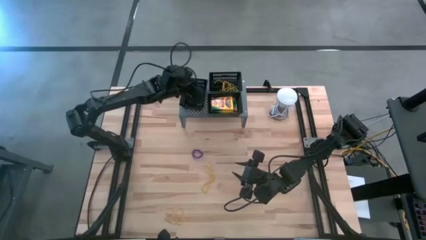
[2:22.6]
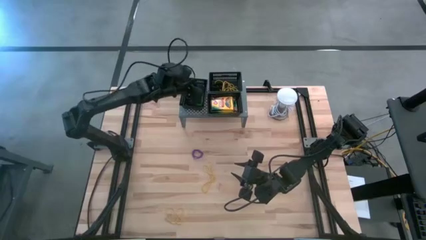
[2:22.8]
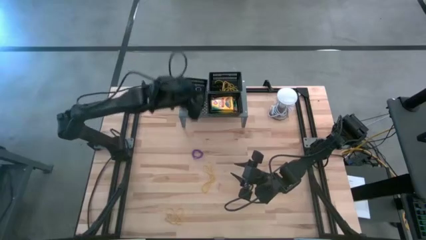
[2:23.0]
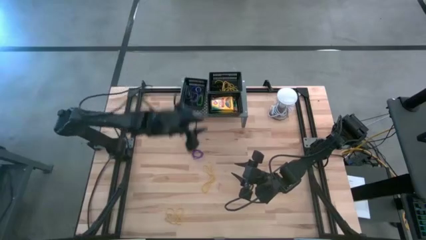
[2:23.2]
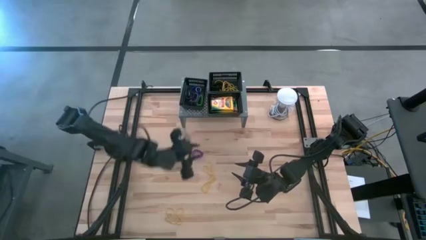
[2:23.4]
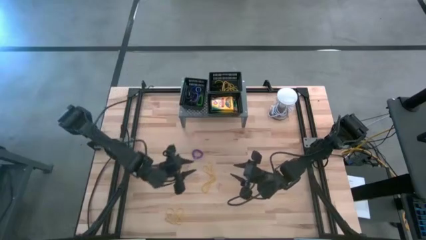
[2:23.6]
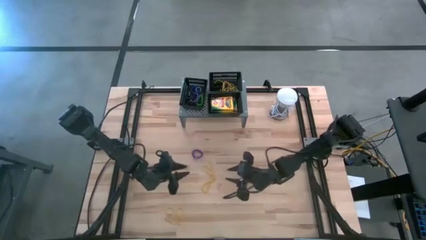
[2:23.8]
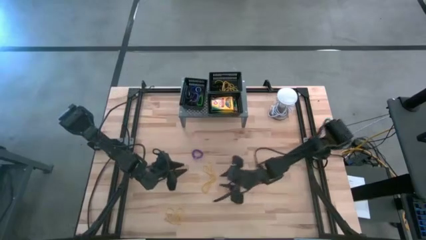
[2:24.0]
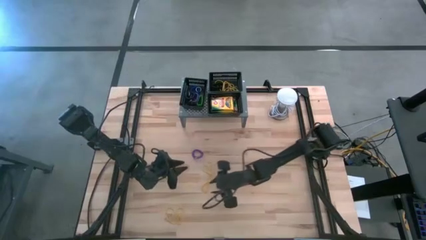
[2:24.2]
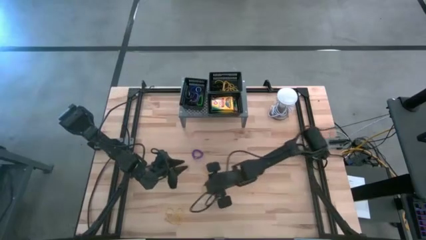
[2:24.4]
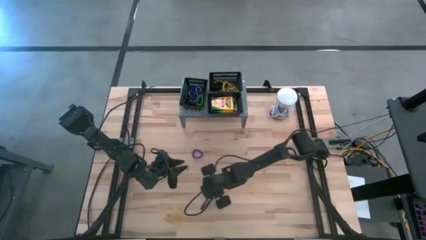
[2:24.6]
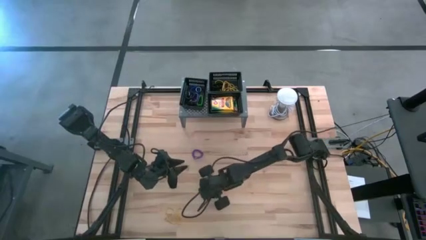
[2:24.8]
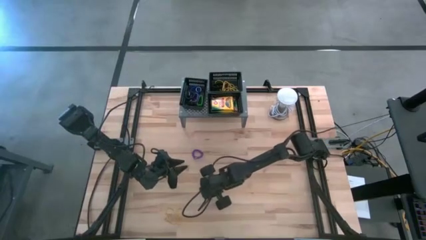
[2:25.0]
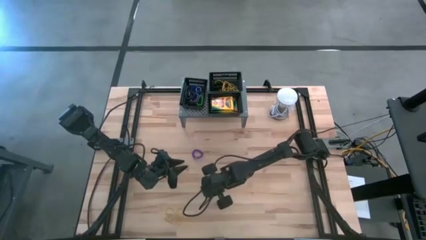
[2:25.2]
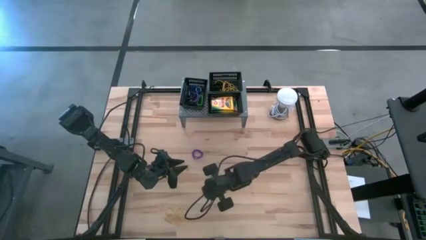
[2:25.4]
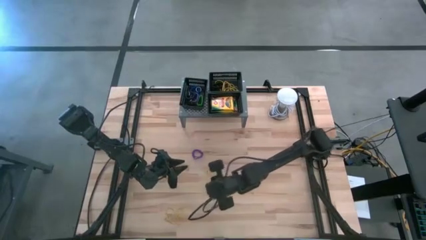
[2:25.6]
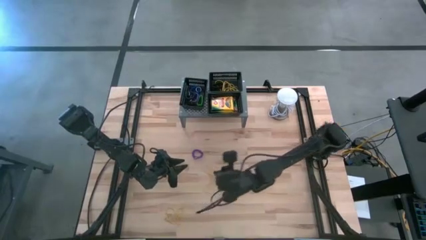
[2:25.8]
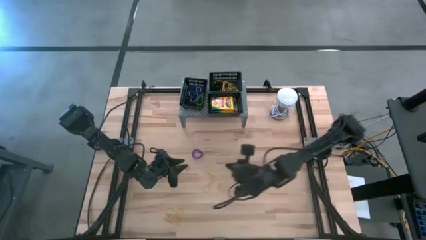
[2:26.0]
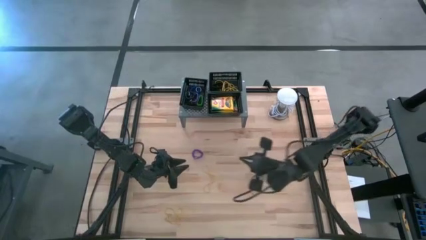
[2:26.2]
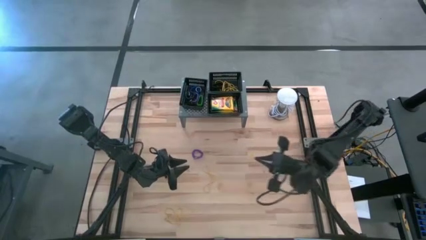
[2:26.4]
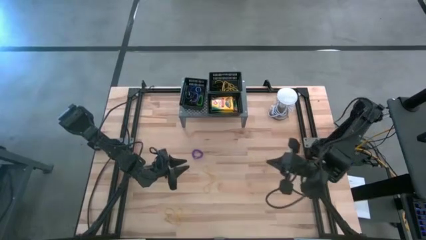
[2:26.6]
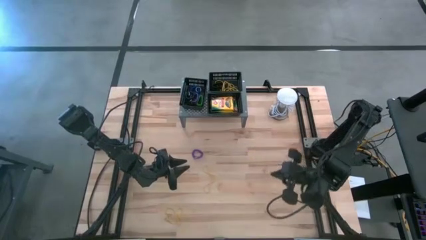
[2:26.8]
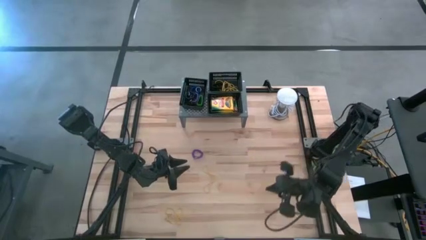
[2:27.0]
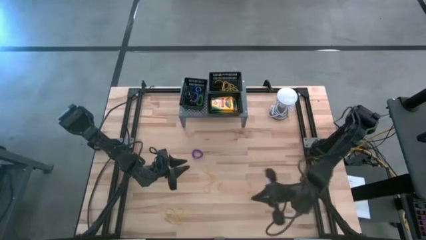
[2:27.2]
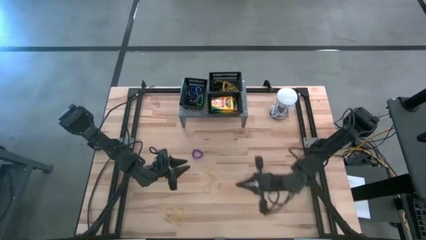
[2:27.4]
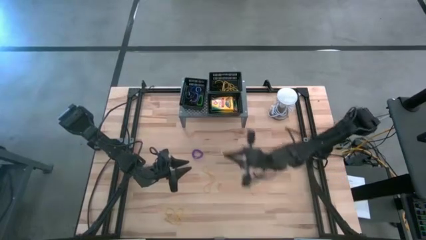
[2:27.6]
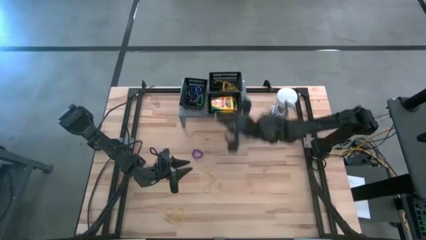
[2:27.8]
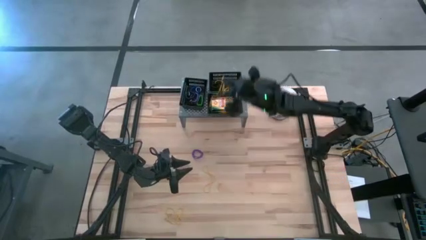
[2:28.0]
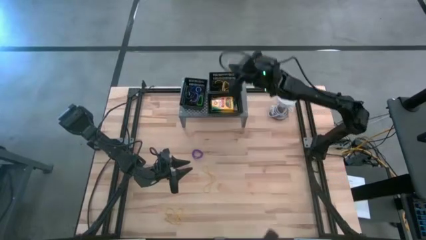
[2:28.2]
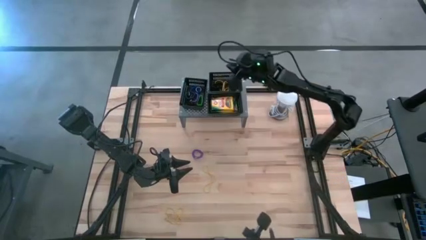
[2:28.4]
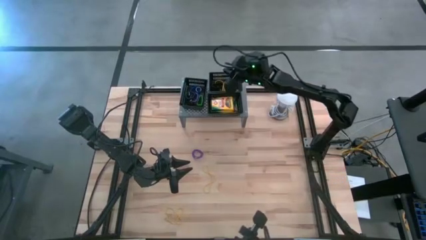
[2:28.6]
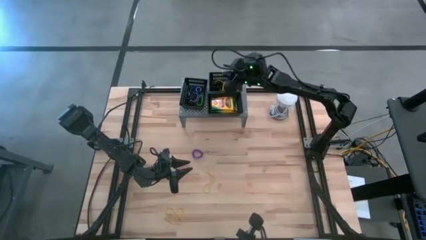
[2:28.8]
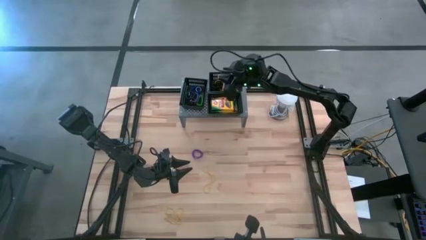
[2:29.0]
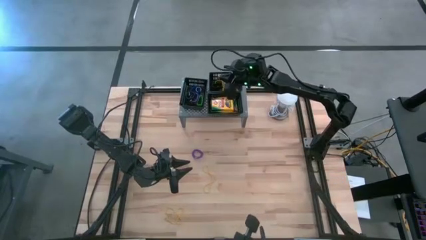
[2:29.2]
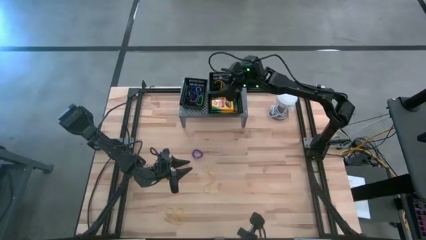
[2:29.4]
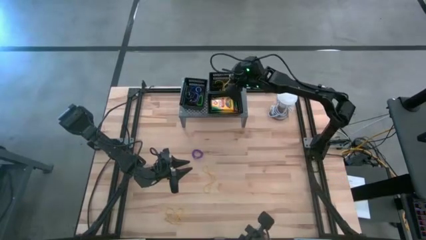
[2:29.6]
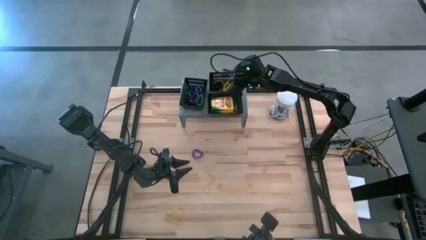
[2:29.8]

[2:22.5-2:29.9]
Task: Pick & Place Office Desk Supplies
Put the yellow rubber band into the top black bin on the shelf

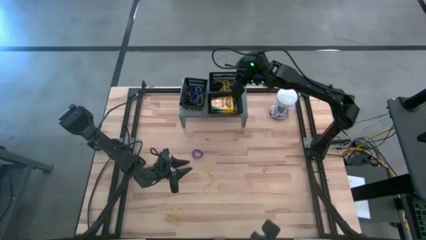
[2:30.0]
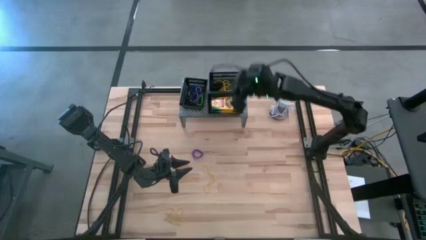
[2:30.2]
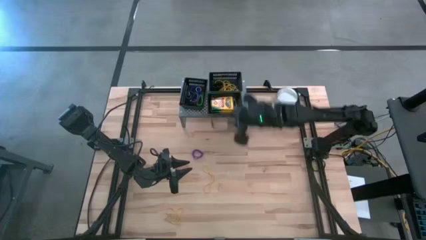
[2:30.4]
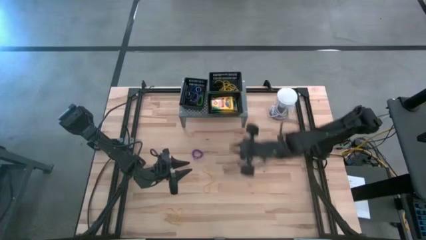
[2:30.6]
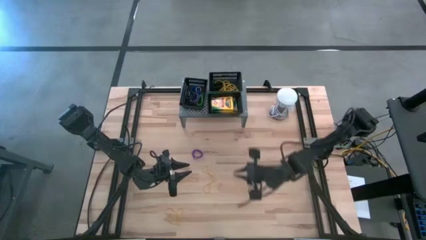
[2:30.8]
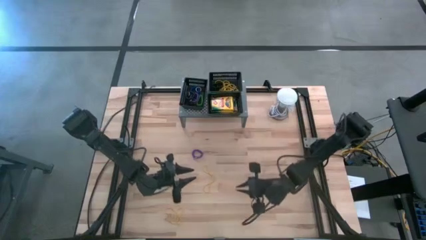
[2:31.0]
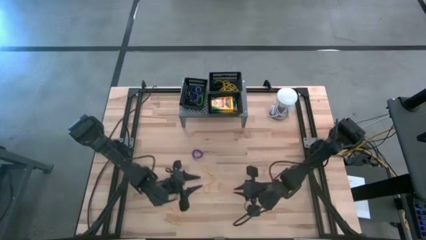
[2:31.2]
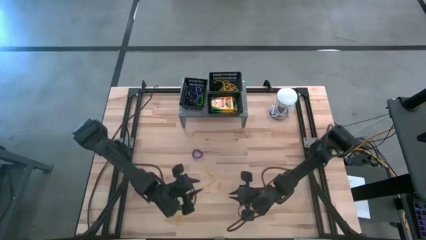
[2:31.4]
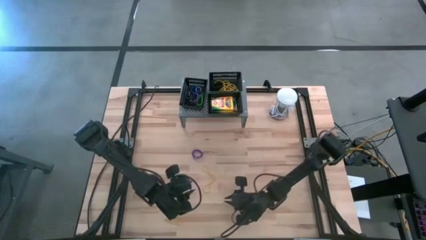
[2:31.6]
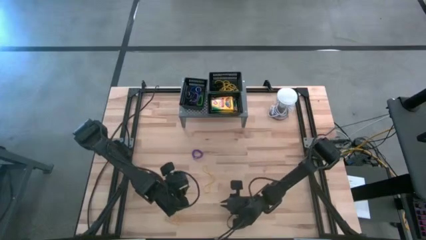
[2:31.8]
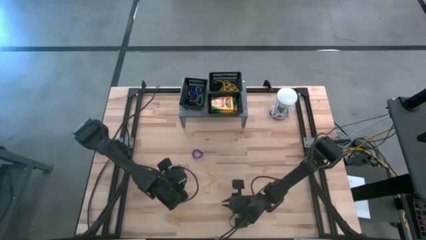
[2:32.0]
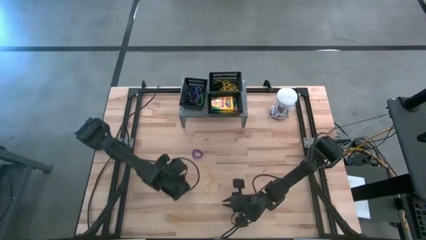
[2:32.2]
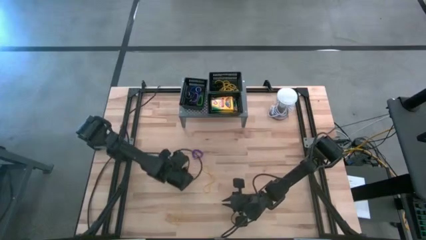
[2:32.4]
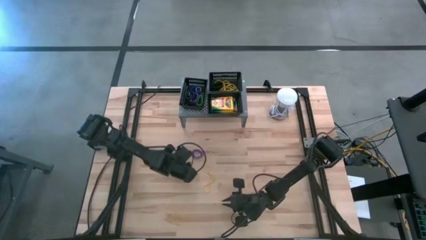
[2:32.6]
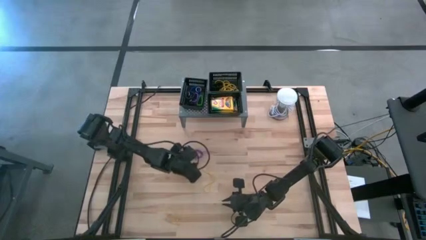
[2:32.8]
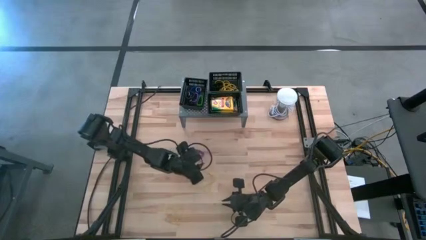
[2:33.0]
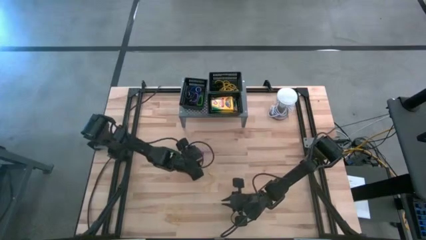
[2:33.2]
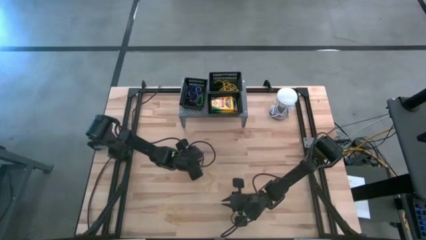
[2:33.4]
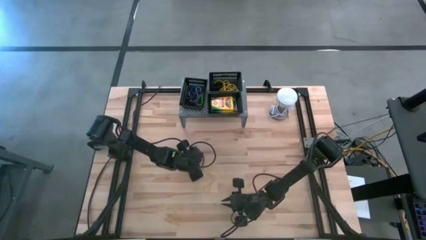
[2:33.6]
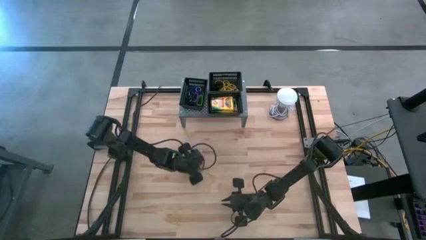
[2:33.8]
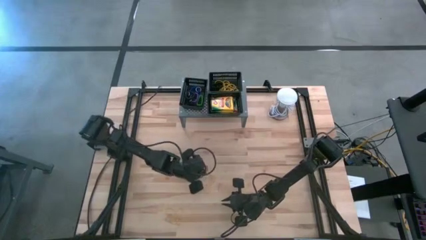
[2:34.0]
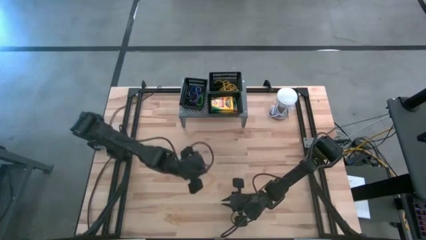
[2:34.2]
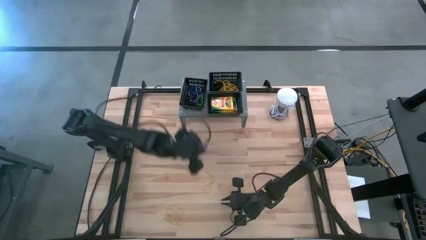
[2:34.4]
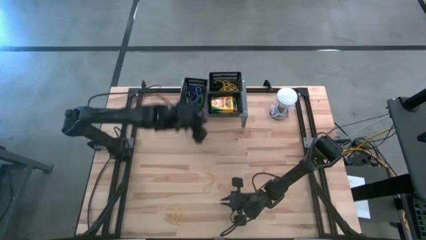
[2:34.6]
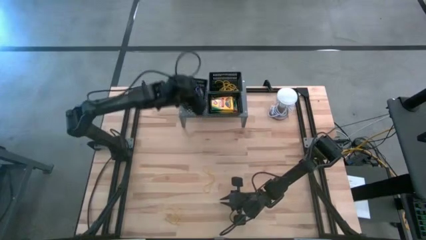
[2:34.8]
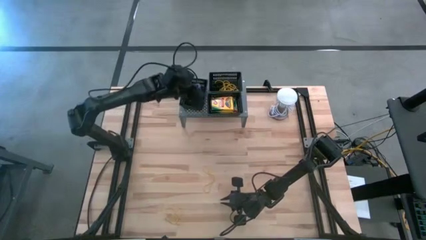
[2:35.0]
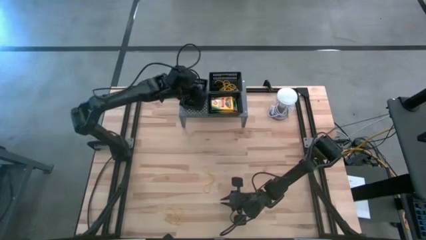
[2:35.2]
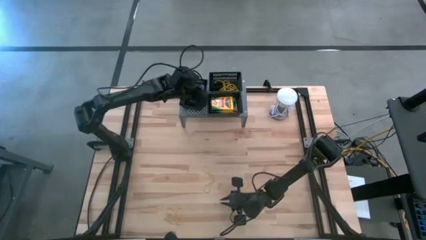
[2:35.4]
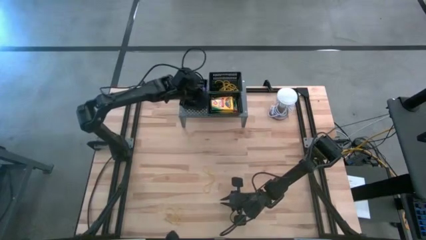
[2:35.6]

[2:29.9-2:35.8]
Put the violet spring keychain into the middle black bin on the shelf

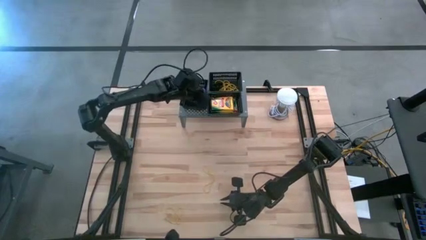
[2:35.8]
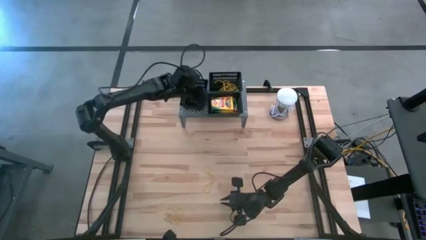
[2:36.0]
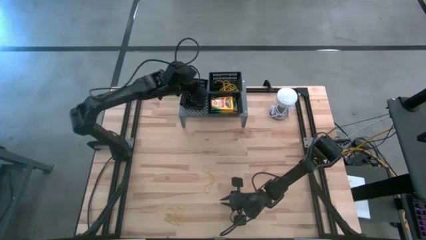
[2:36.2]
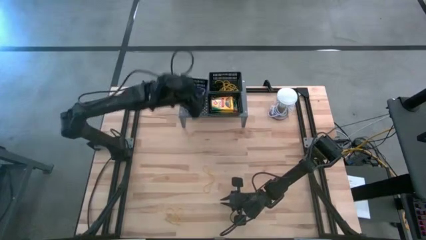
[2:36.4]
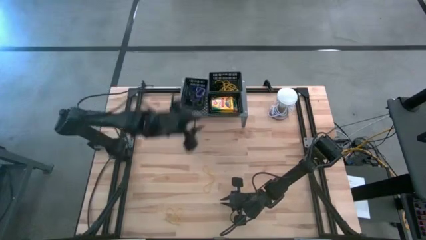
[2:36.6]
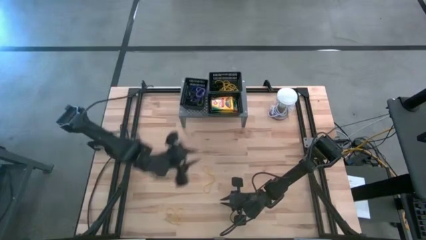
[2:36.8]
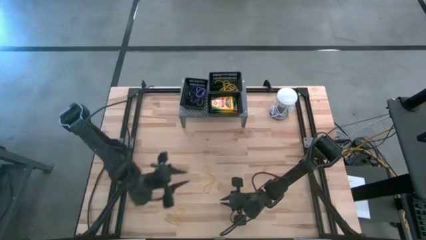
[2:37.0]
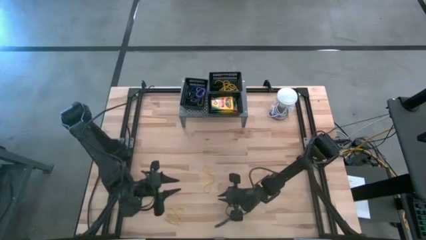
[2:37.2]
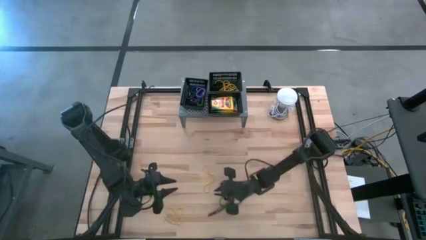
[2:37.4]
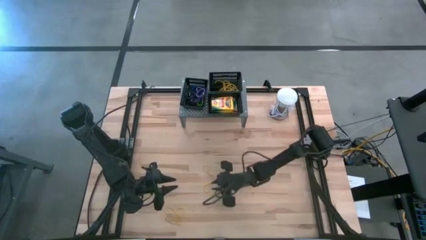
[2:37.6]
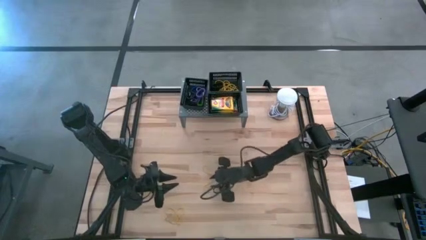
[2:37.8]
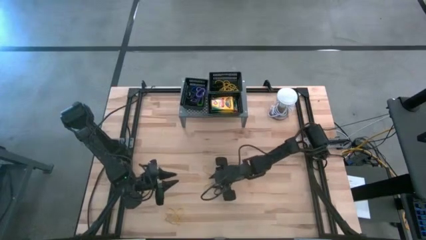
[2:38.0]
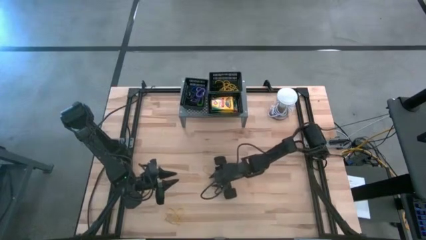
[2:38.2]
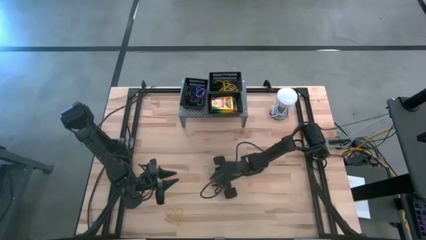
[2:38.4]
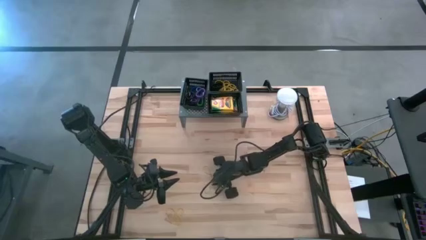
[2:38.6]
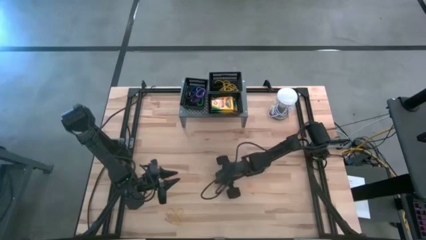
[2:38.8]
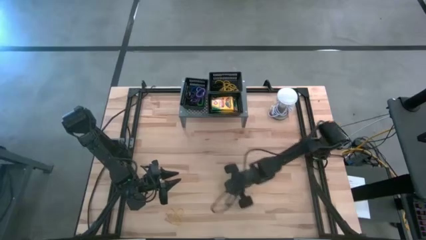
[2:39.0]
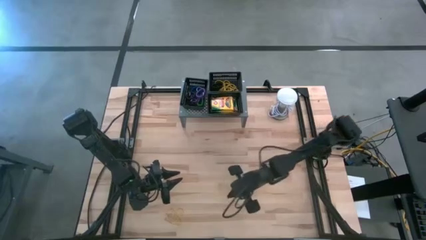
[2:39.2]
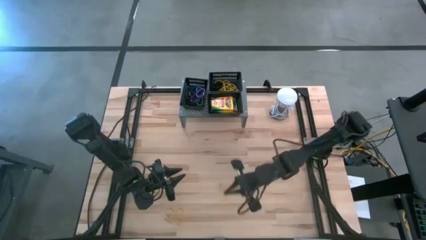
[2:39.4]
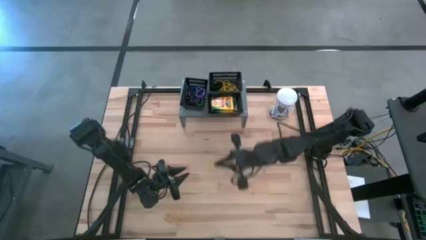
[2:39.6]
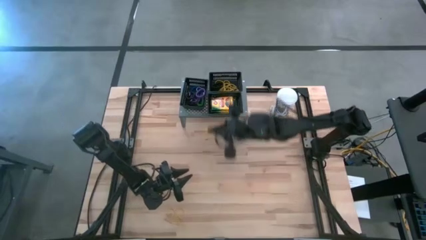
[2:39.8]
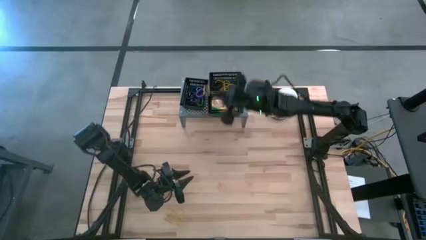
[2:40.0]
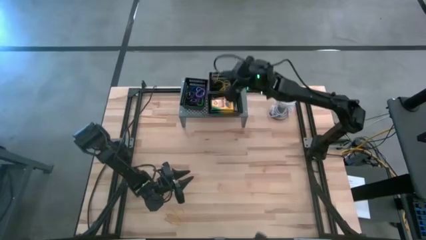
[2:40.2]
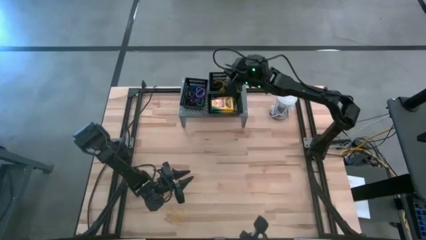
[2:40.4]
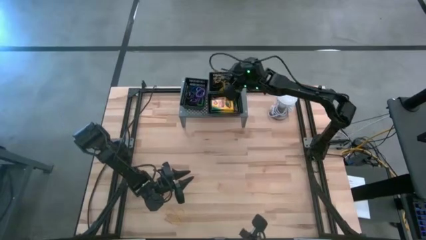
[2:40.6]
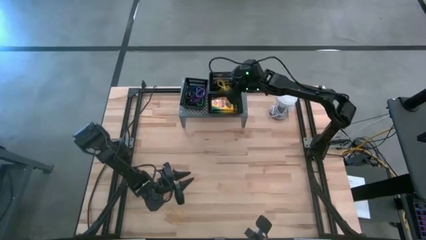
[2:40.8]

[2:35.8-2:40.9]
Put the yellow rubber band into the top black bin on the shelf
